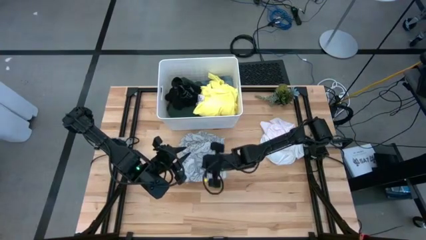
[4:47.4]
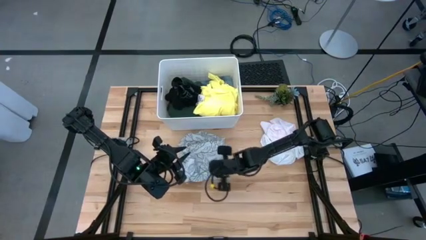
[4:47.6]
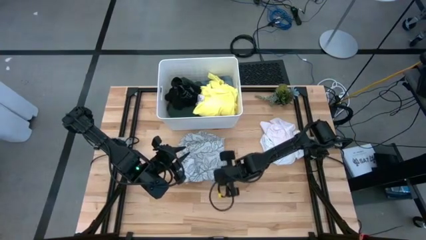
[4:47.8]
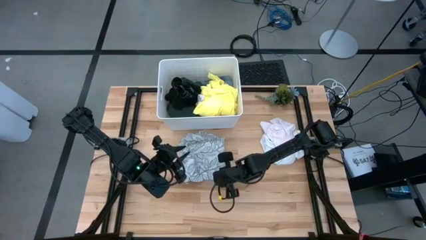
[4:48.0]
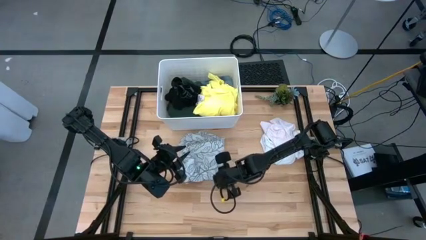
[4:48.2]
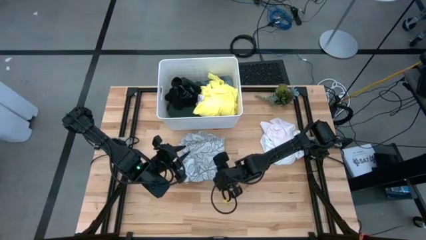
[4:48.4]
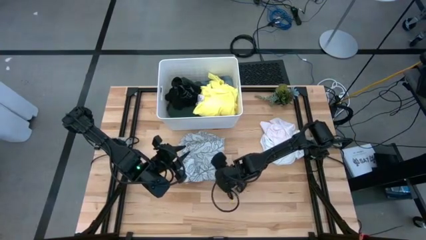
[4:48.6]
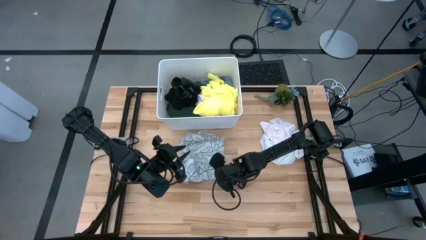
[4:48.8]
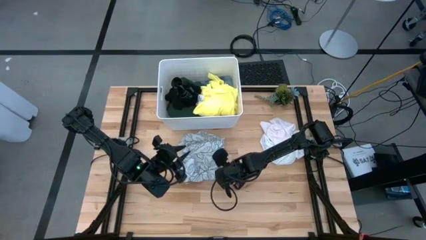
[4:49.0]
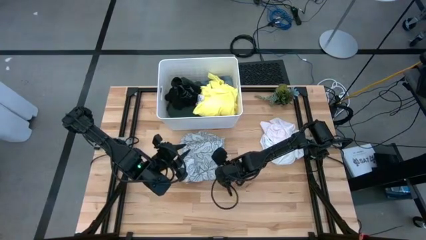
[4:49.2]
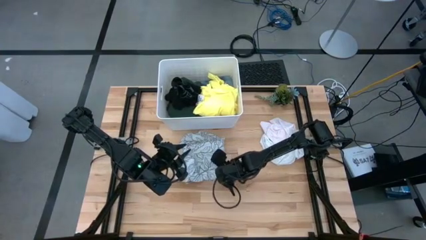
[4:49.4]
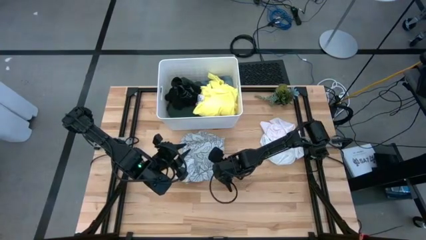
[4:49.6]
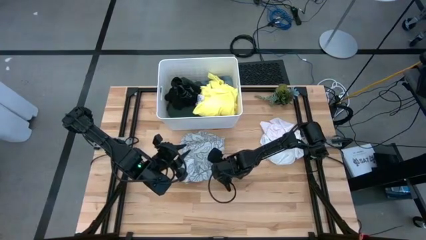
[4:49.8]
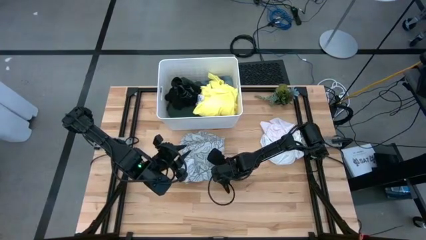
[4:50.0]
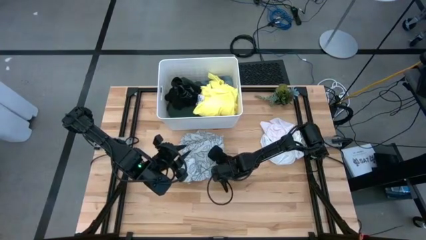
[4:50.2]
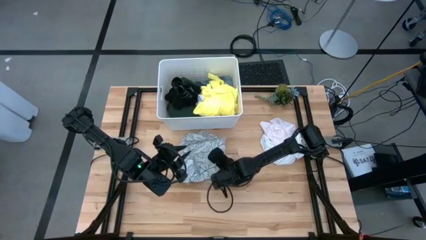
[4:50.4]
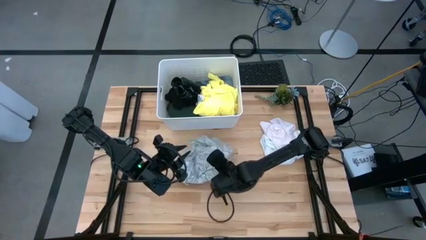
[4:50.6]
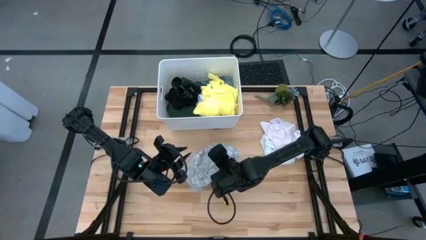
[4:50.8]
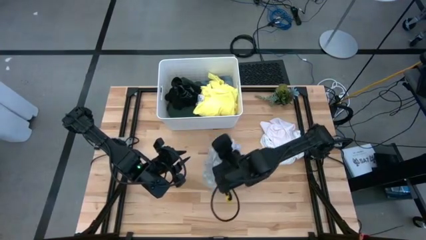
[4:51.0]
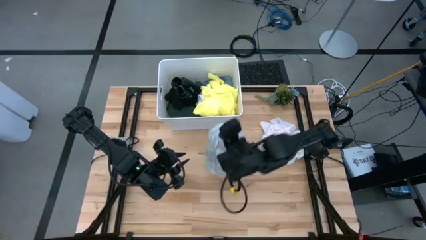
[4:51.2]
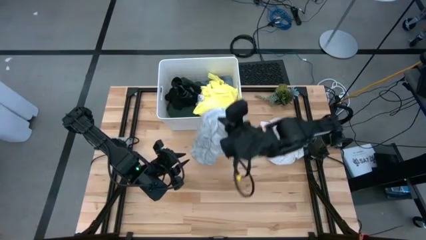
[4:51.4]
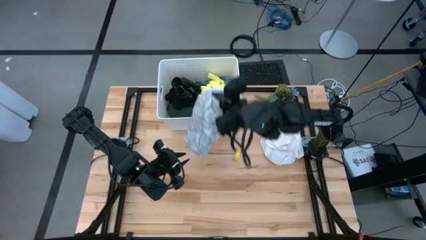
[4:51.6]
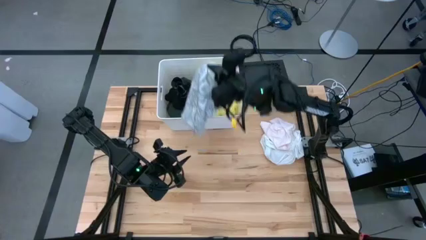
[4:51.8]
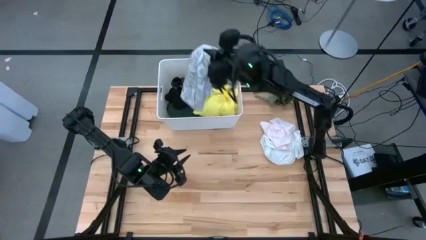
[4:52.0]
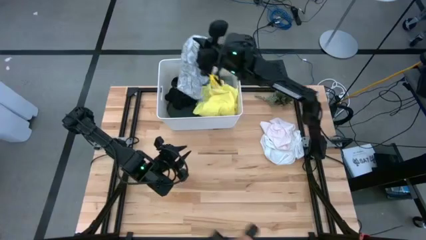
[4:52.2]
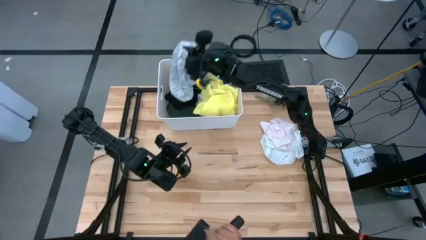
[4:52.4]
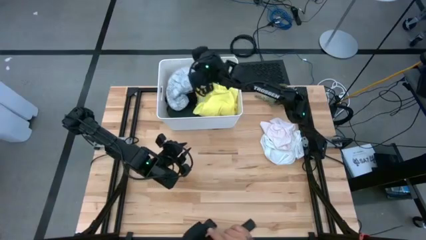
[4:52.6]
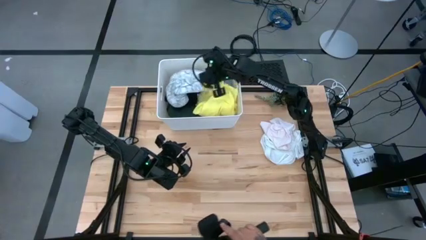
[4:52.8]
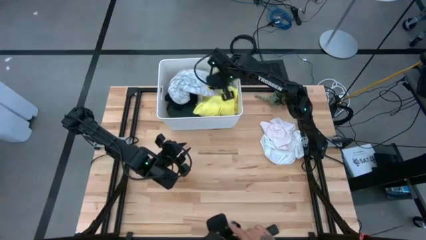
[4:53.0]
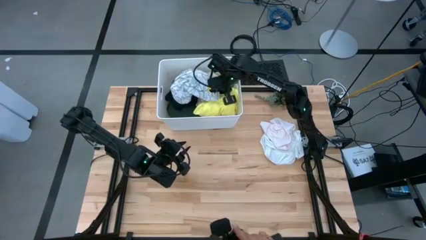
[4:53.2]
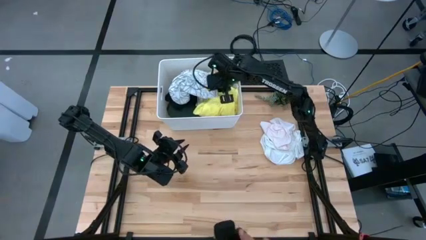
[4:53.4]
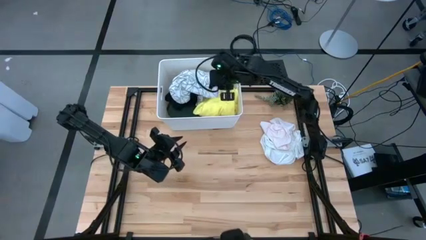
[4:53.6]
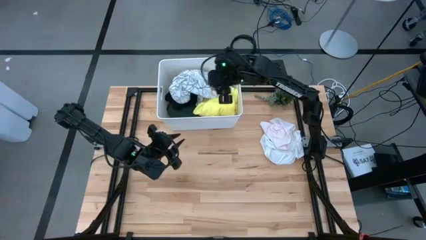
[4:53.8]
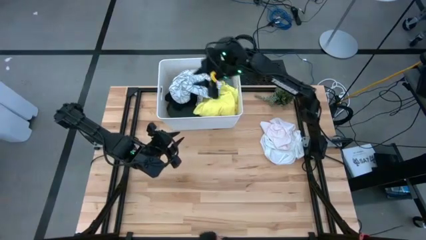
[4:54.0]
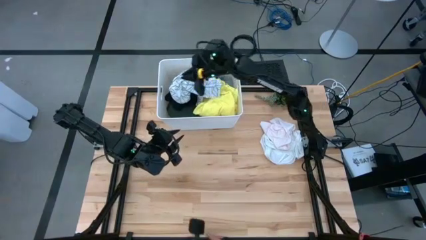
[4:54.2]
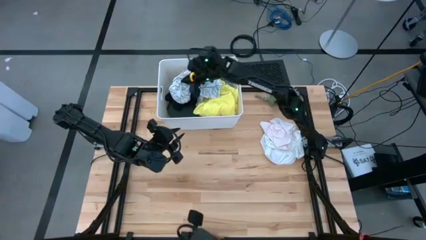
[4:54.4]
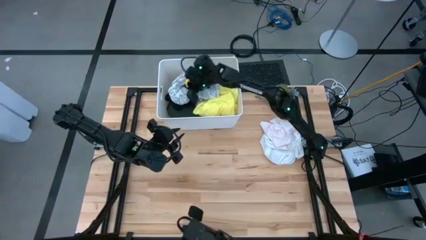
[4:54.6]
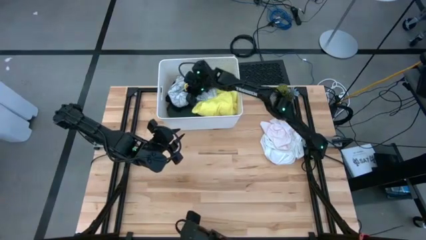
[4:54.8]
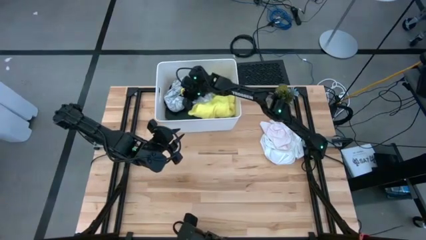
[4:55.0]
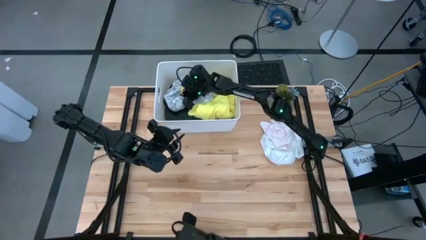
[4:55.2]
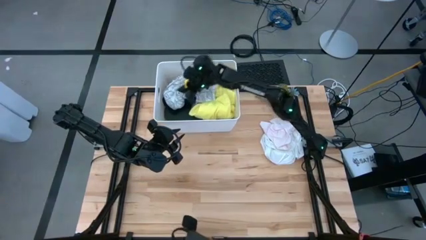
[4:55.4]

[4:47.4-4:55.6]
Task: Fold laundry
Put the folded white patterned shirt into the white laundry bin

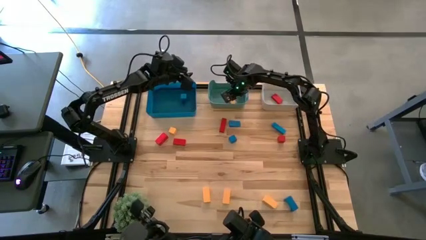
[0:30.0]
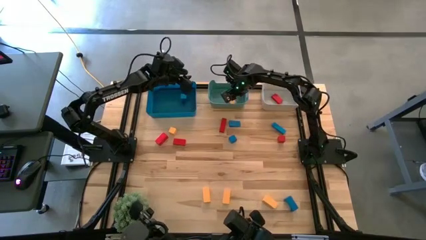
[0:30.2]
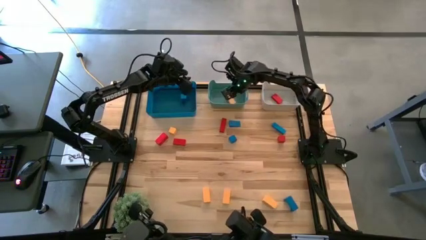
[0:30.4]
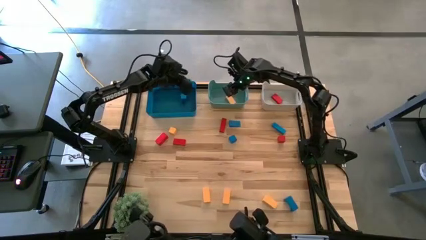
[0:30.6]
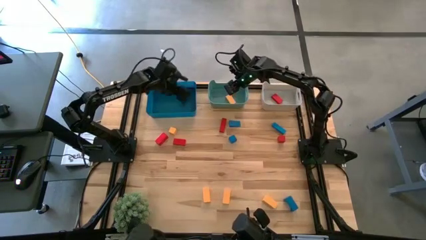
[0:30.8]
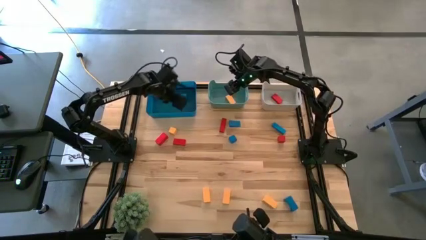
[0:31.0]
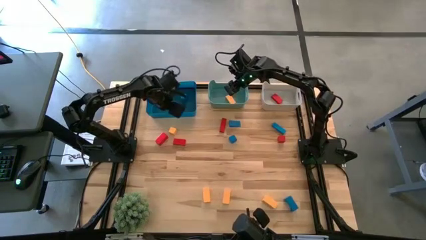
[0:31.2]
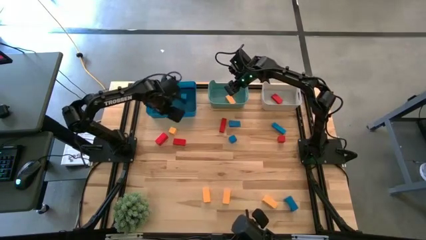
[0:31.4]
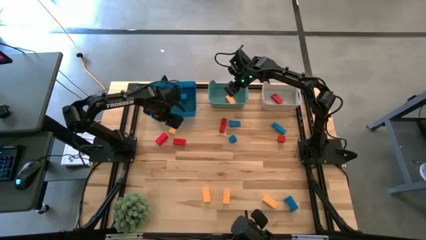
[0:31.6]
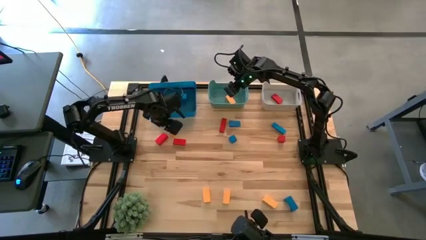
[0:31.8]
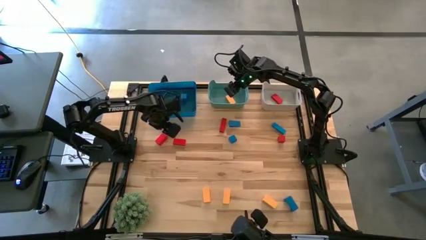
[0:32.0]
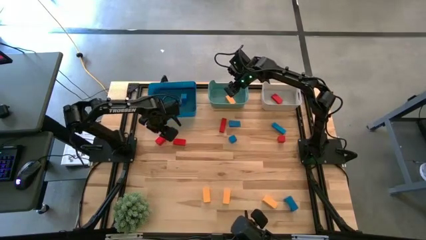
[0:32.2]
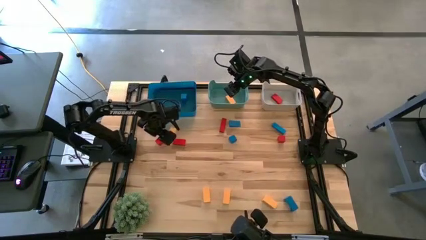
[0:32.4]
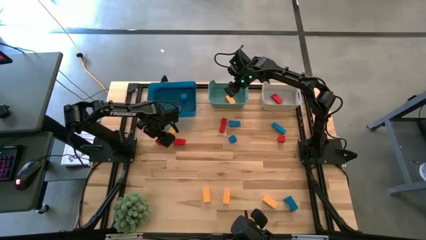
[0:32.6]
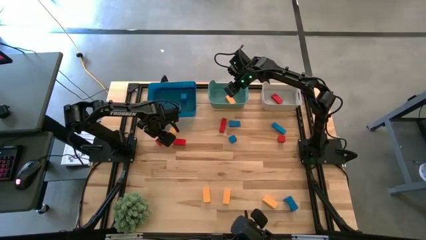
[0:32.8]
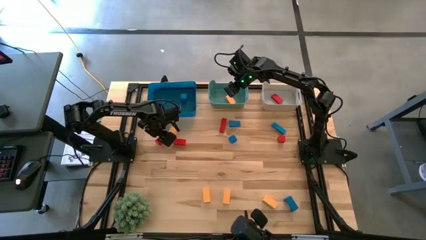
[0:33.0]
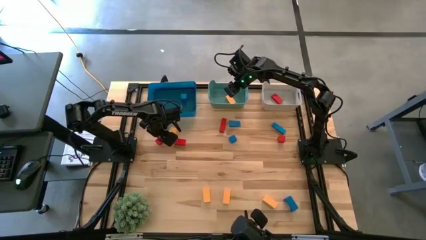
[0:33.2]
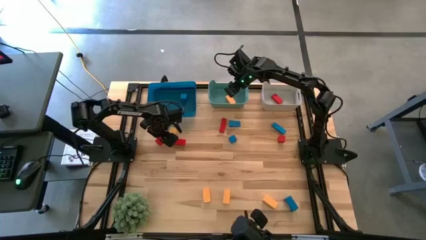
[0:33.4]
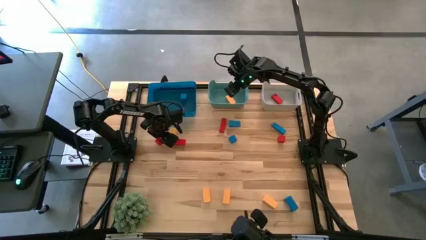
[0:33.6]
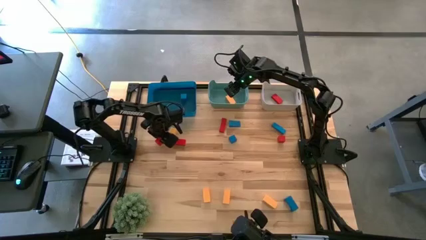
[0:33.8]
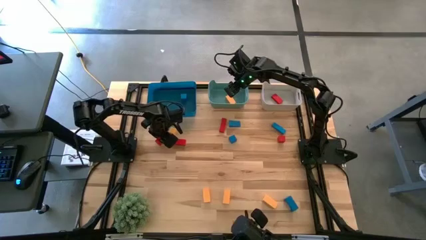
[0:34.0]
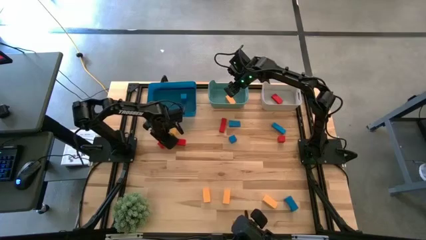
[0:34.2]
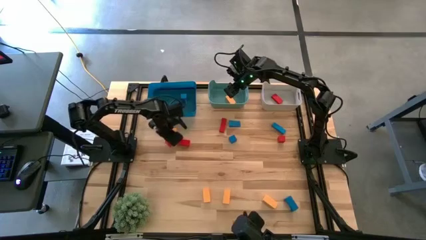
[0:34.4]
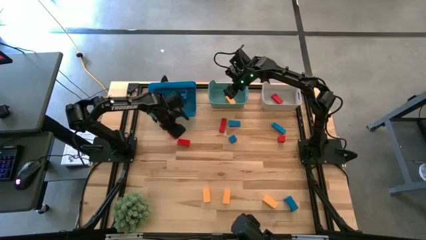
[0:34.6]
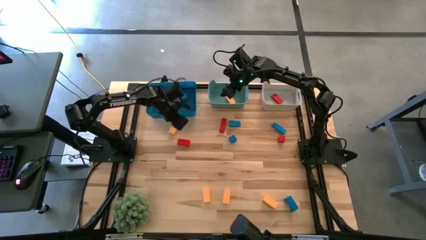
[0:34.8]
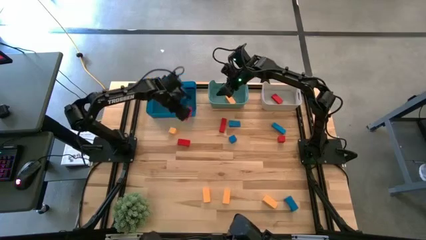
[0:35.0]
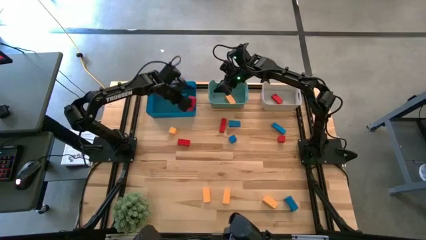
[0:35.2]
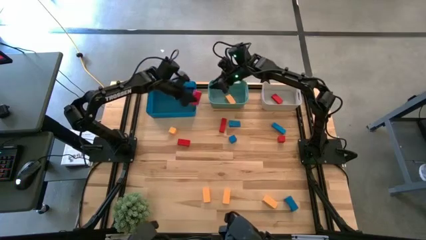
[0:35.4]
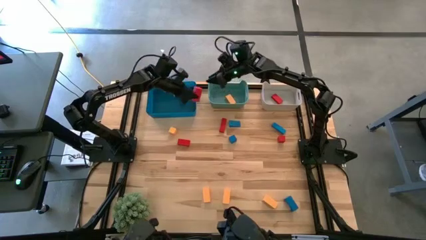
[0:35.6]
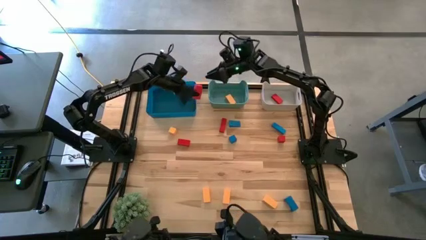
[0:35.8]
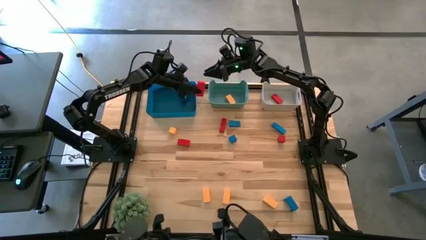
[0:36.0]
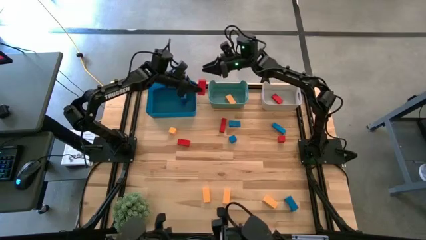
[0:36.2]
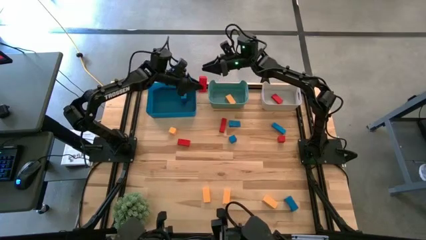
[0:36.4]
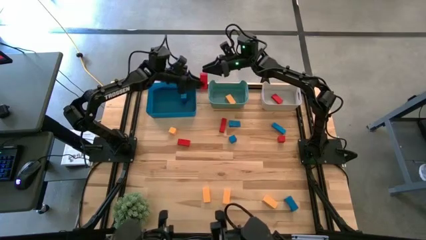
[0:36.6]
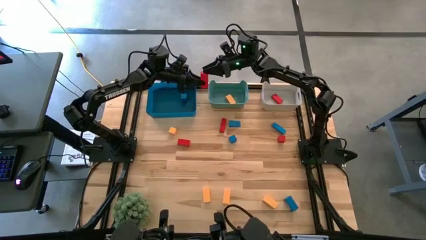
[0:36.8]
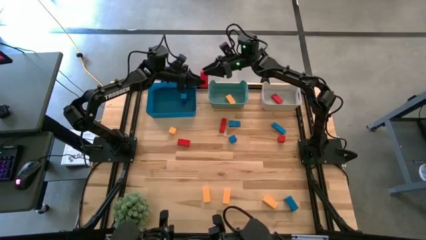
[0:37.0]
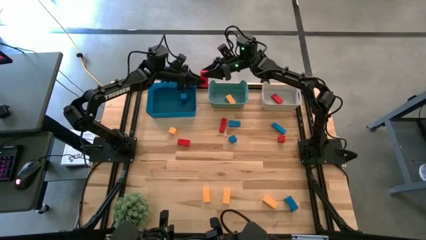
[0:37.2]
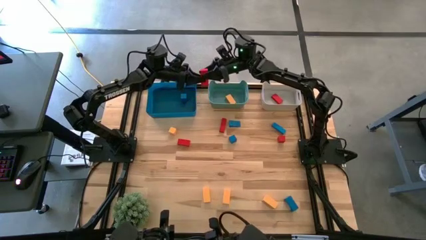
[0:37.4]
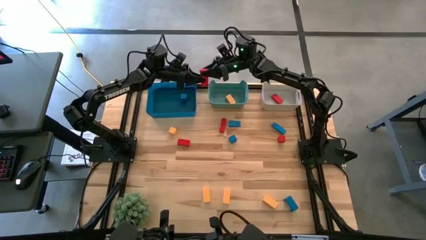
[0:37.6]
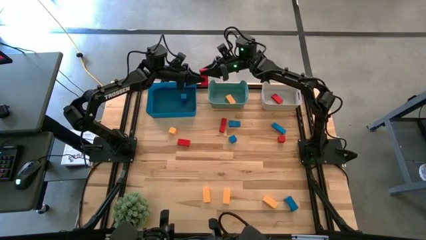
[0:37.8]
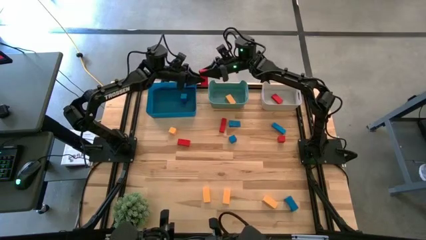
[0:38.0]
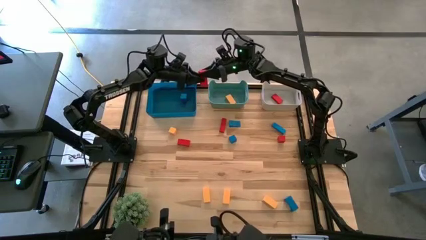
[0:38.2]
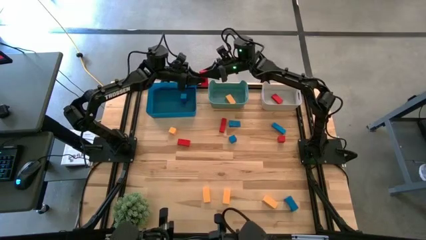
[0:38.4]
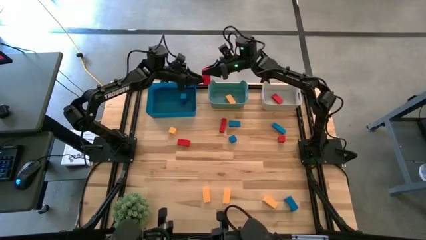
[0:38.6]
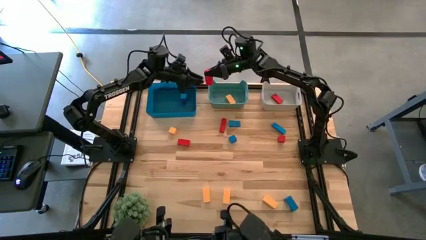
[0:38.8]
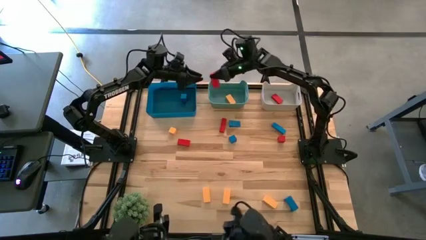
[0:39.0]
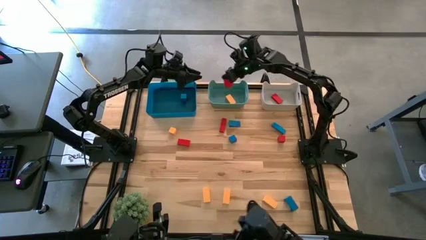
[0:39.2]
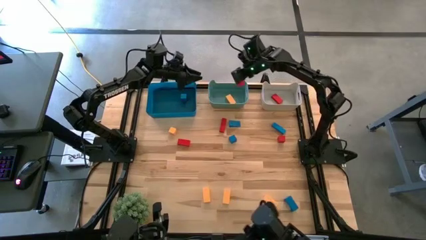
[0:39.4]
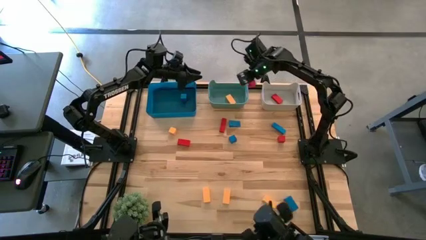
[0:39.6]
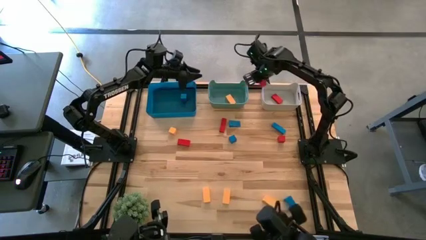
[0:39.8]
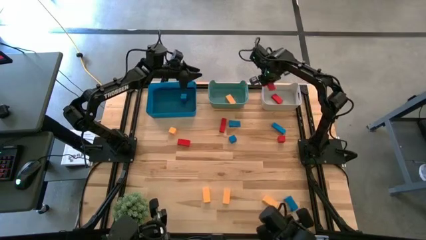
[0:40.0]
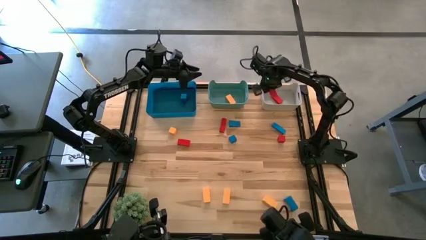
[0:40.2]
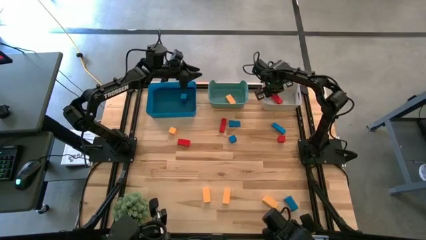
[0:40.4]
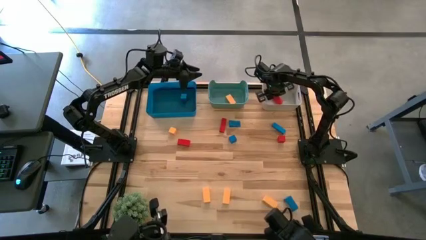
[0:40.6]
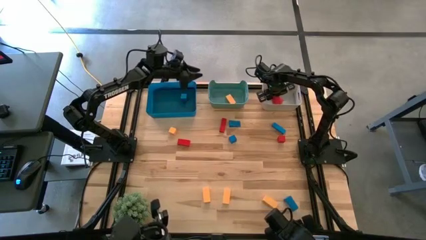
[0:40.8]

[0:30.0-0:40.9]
Task: Sort & place blocks by color
Put the red block into the grey bin
